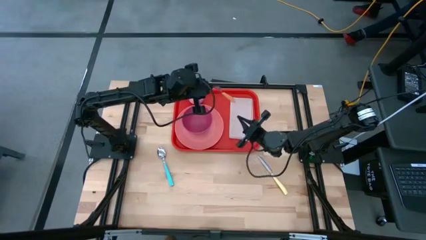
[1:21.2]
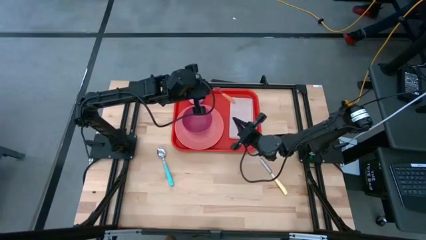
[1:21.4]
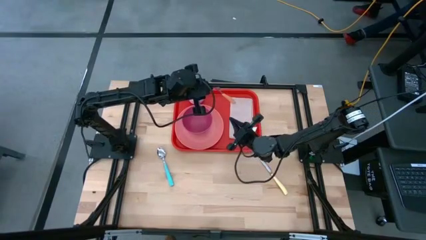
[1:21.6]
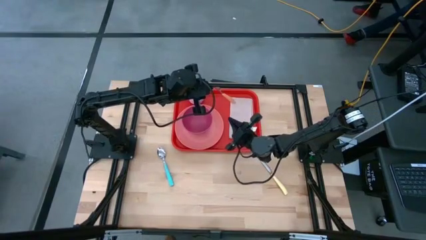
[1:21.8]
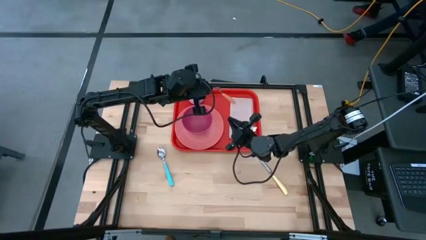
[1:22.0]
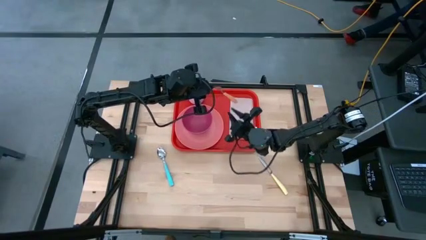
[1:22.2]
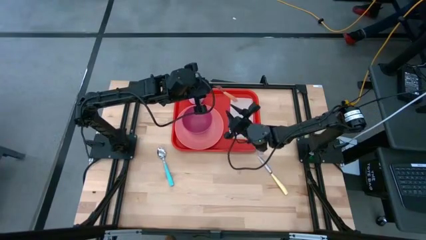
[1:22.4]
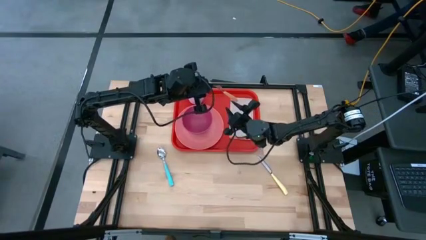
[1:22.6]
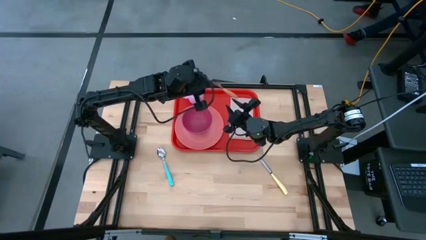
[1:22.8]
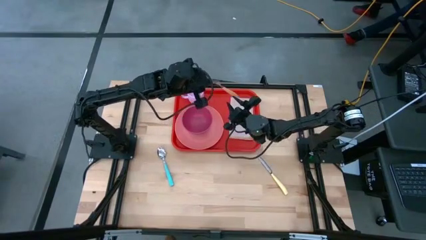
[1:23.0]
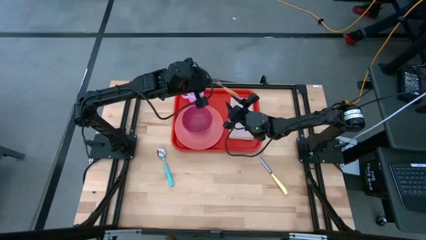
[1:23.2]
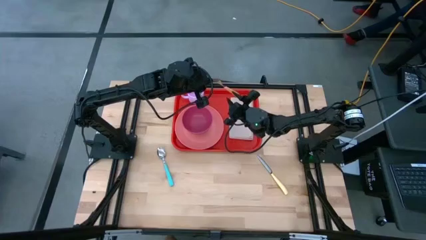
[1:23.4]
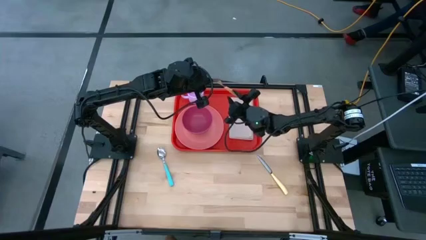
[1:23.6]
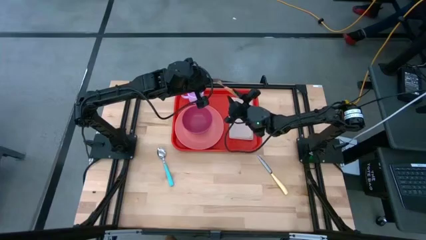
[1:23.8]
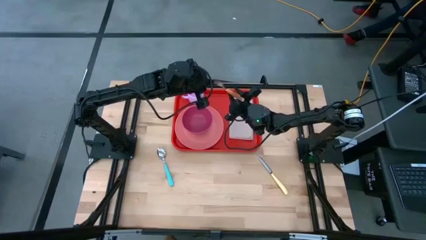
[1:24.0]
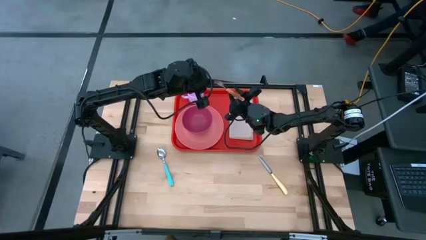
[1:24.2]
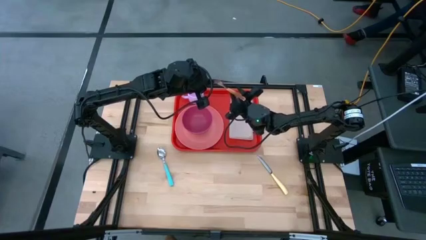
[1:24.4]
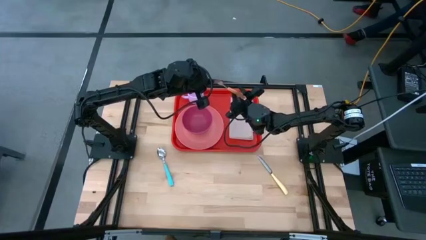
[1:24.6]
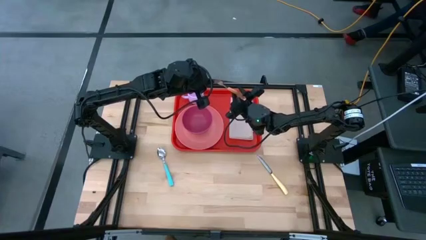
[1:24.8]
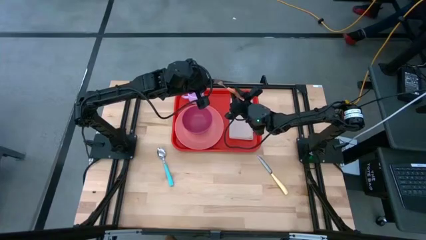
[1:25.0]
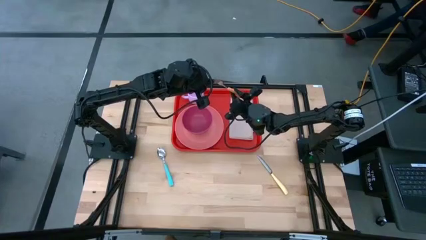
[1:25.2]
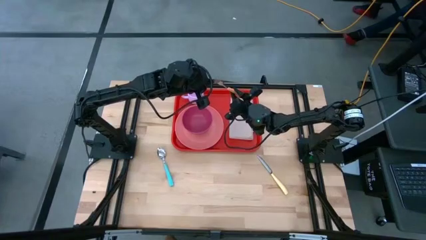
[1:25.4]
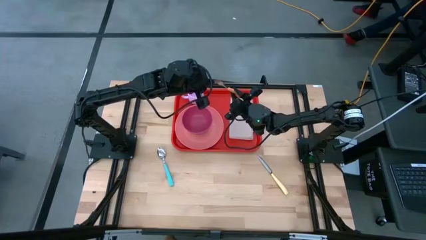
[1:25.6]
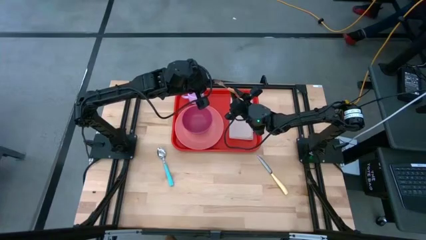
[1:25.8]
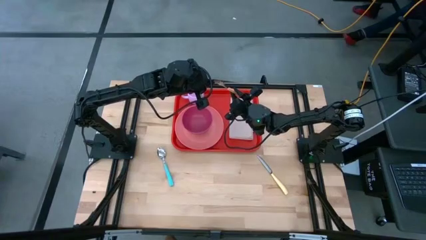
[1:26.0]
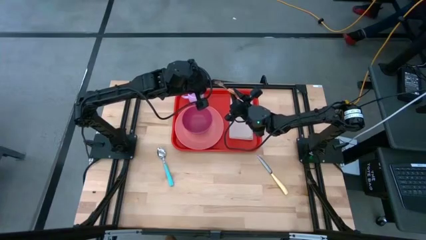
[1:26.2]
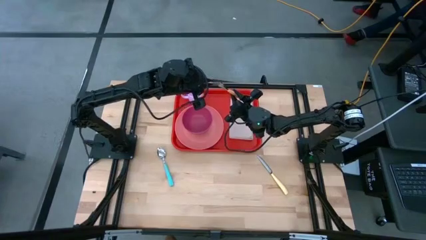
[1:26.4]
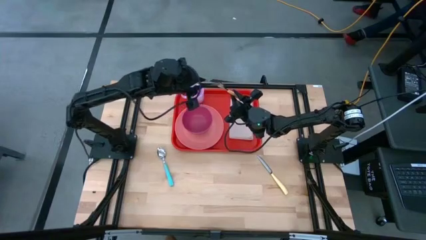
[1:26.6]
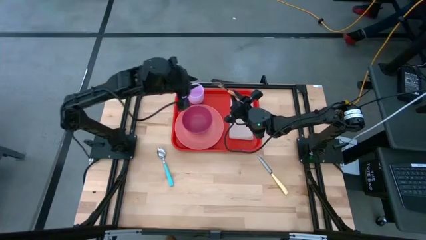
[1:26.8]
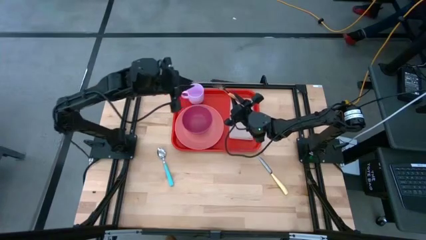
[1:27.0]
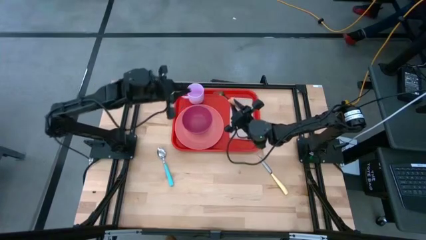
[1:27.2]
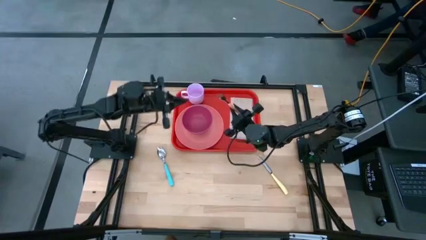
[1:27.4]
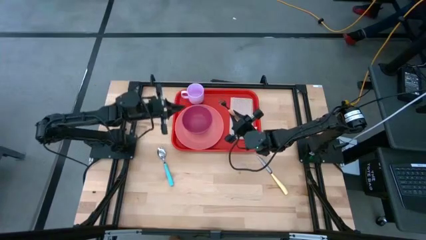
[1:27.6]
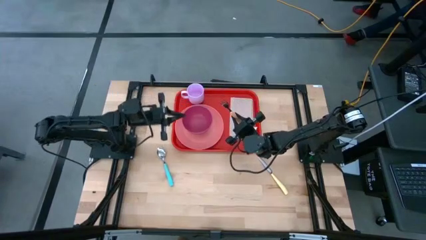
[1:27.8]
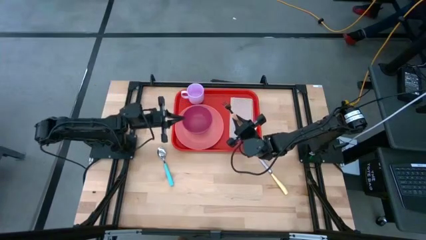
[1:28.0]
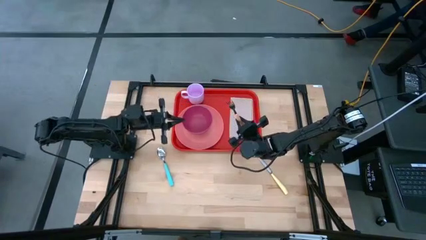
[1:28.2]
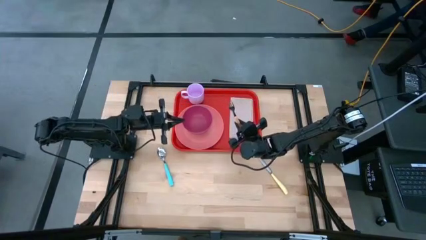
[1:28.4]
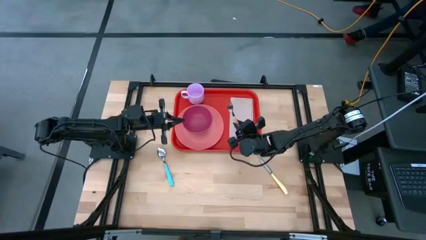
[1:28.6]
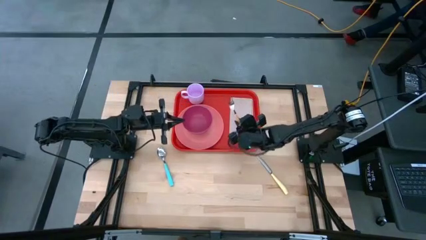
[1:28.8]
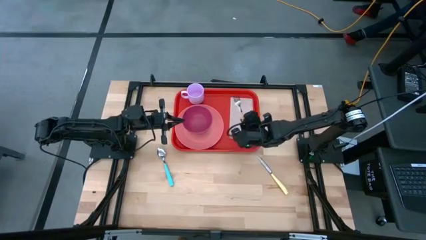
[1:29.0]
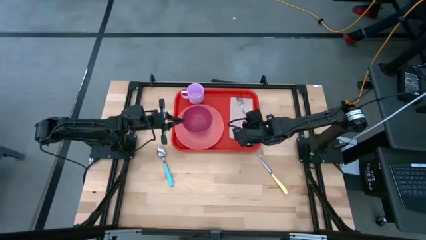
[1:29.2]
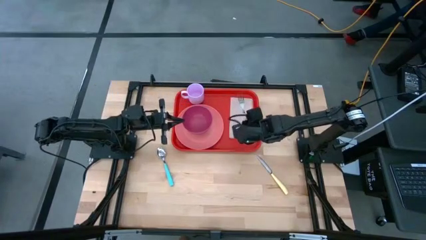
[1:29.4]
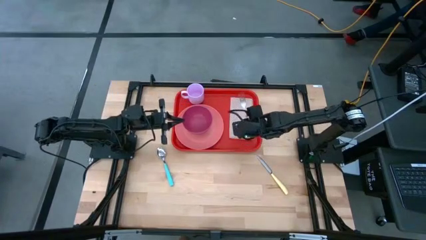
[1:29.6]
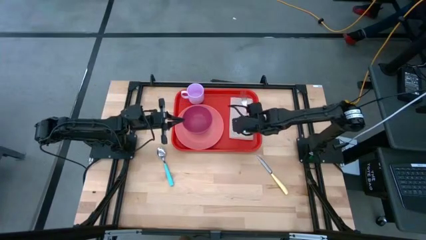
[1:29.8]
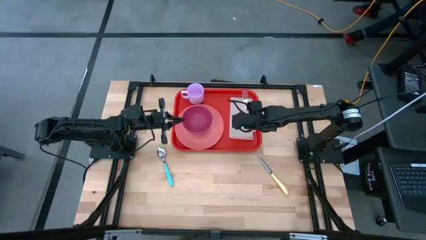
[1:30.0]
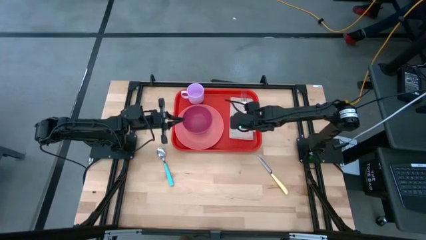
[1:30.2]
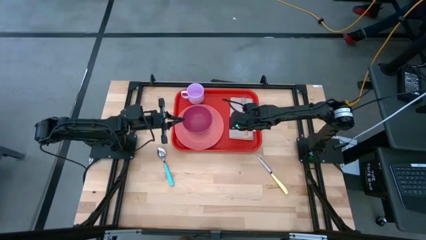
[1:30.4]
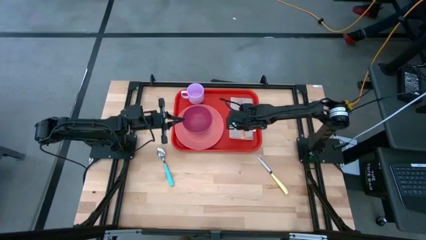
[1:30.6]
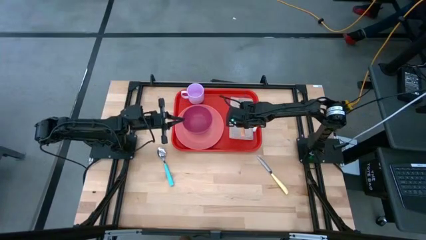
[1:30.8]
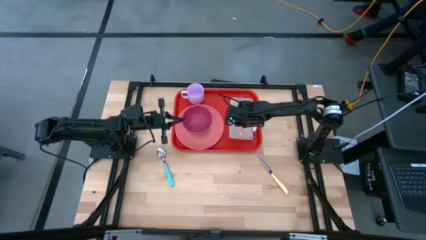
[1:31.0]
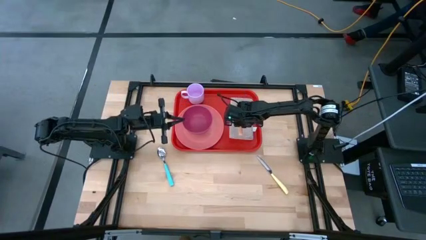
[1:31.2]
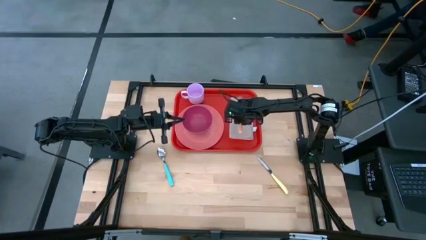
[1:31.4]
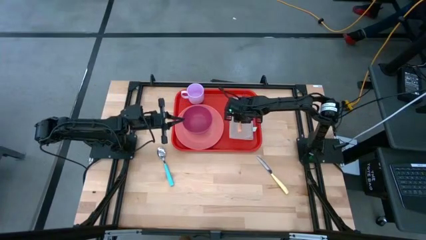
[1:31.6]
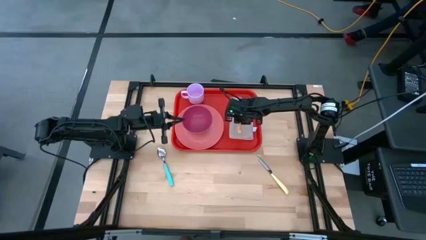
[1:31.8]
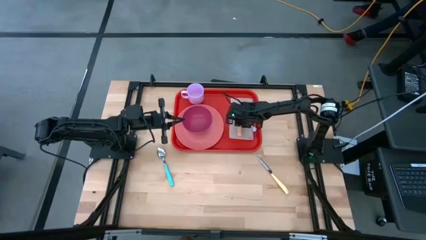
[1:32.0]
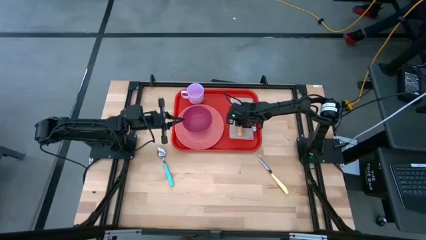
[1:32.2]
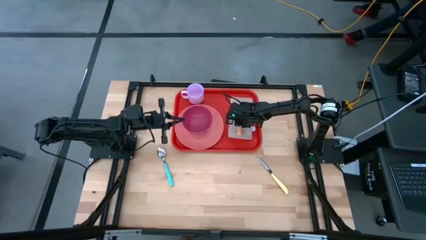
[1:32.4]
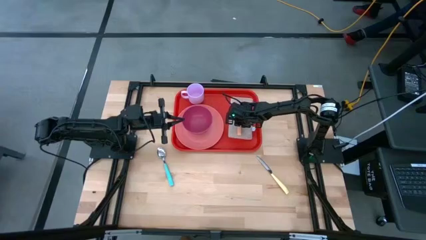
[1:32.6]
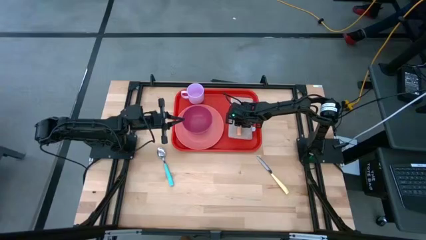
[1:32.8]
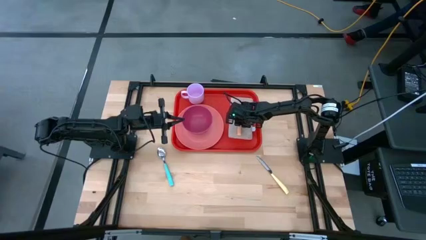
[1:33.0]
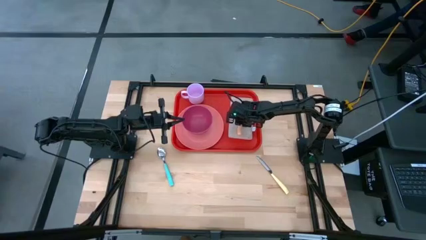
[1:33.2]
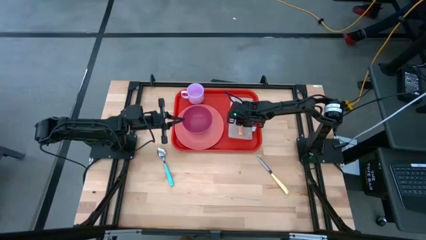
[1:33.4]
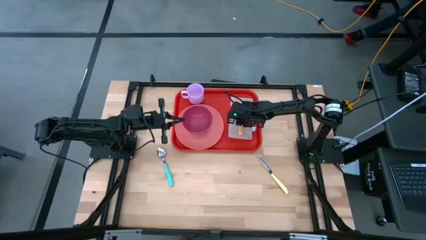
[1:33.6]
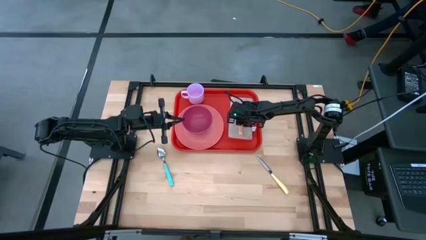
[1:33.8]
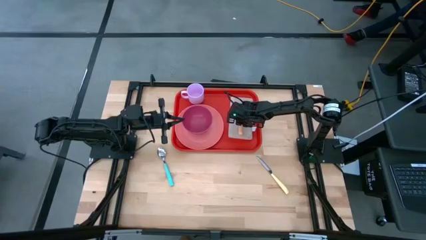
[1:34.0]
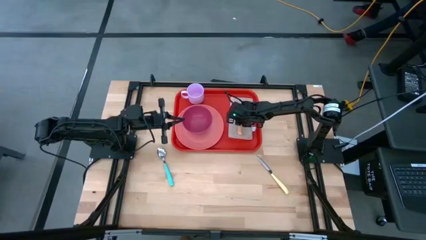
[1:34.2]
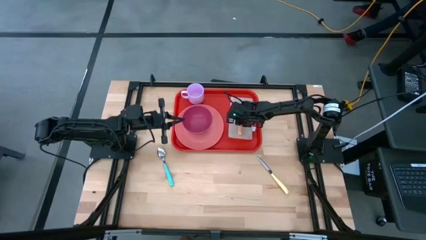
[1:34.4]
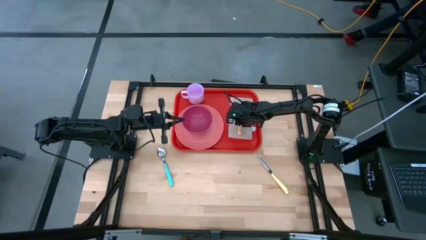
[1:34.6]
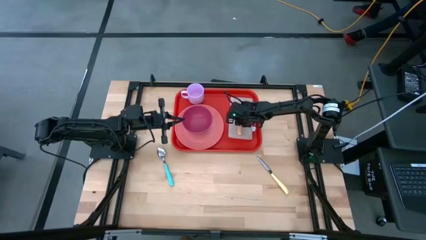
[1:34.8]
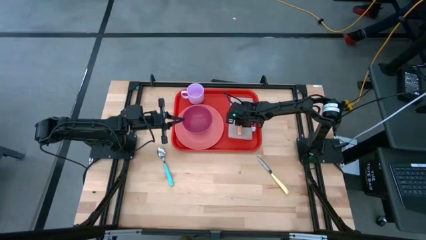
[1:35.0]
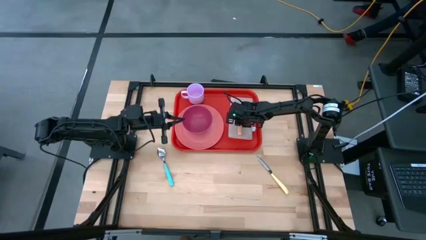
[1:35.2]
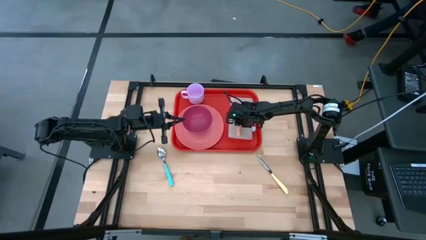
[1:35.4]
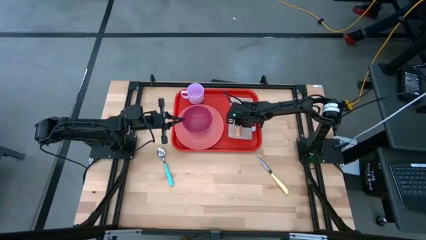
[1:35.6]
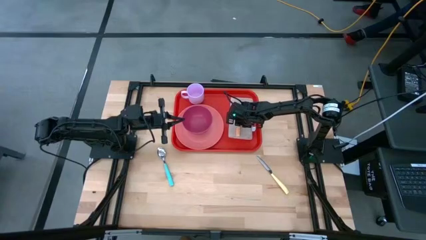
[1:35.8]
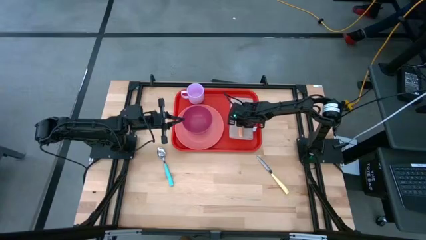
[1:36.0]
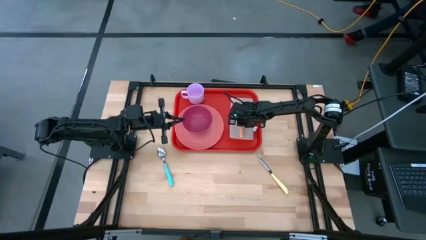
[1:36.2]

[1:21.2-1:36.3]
Task: Set up tray
Put the orange fork on the brown napkin
